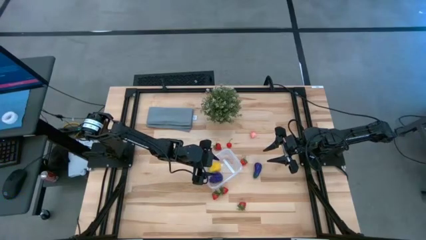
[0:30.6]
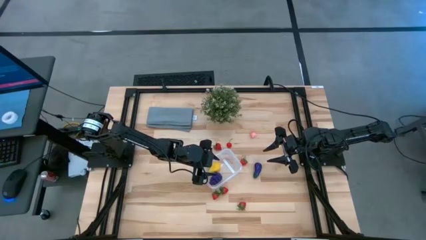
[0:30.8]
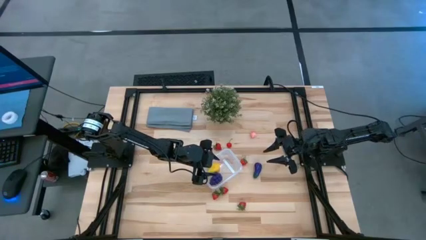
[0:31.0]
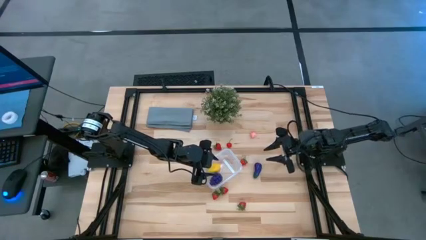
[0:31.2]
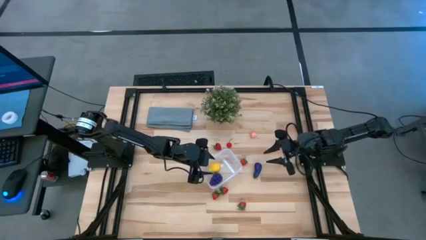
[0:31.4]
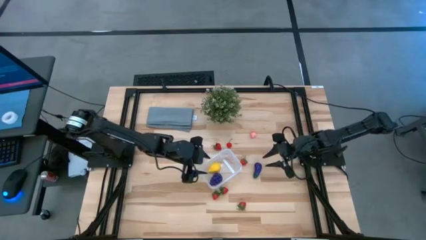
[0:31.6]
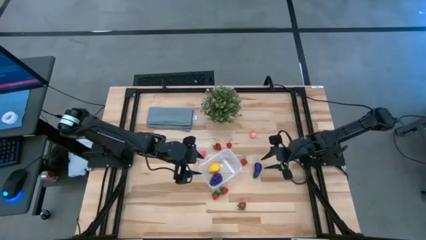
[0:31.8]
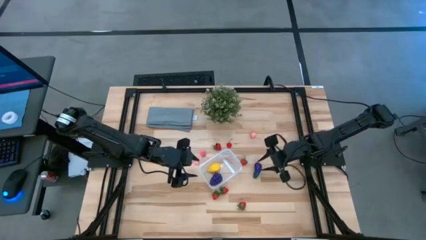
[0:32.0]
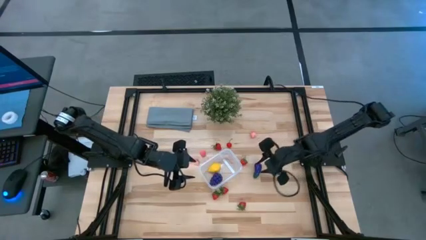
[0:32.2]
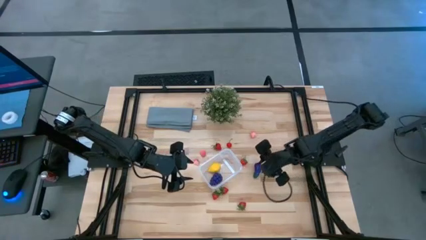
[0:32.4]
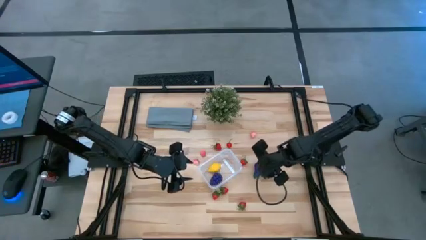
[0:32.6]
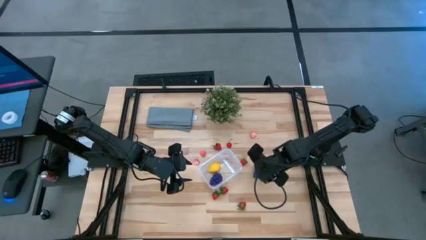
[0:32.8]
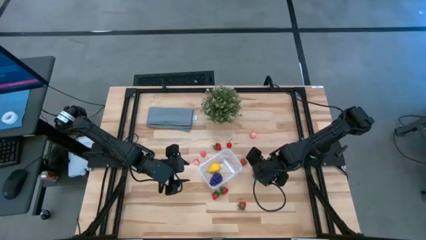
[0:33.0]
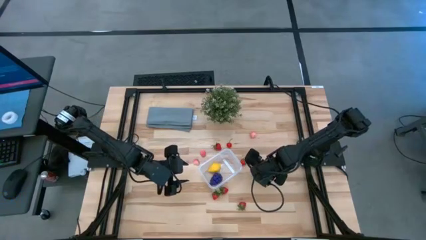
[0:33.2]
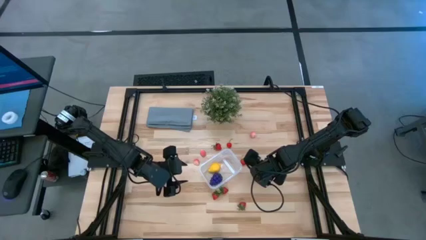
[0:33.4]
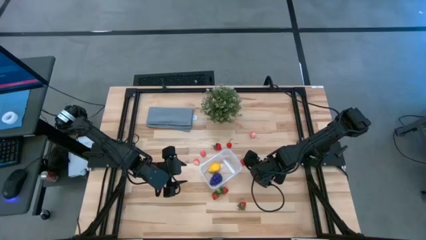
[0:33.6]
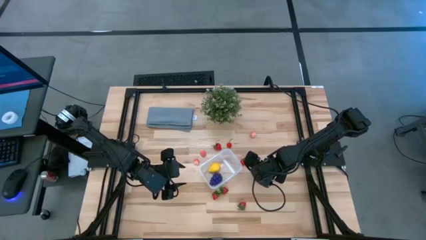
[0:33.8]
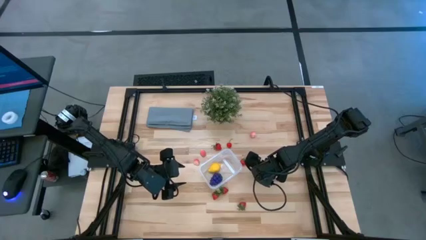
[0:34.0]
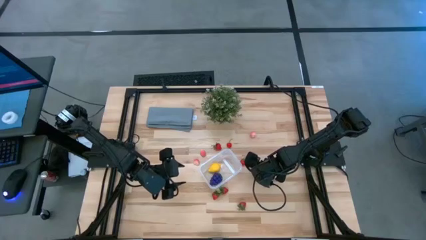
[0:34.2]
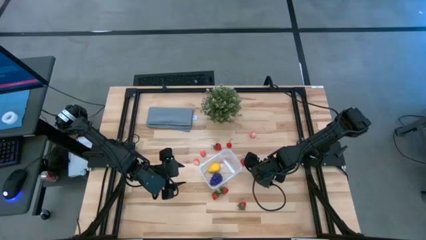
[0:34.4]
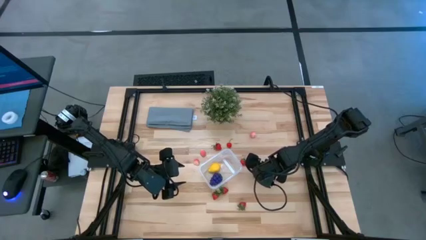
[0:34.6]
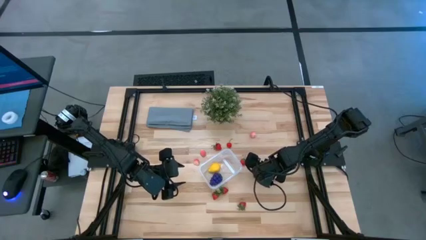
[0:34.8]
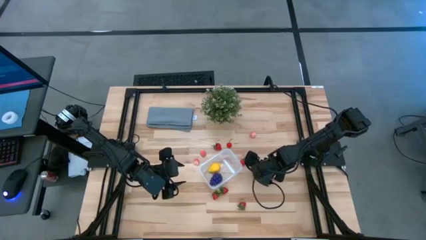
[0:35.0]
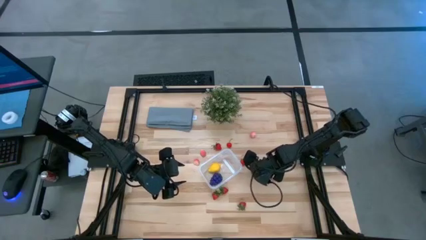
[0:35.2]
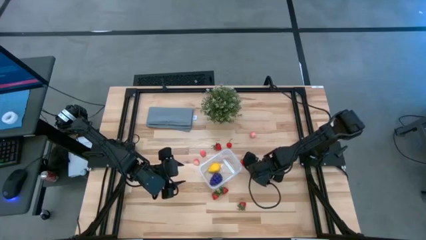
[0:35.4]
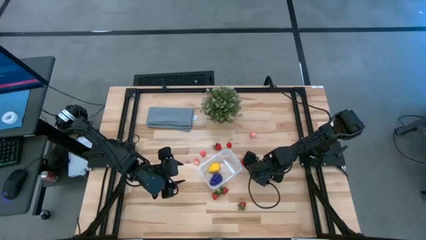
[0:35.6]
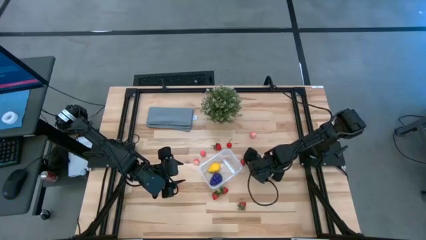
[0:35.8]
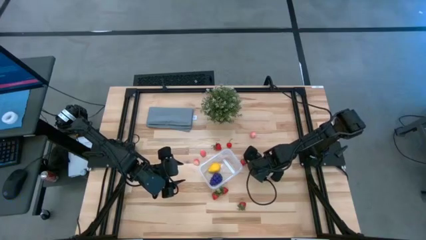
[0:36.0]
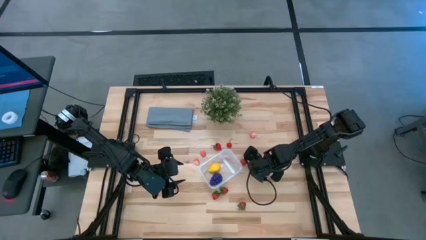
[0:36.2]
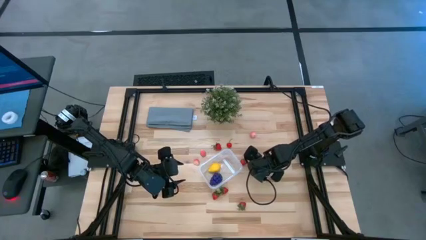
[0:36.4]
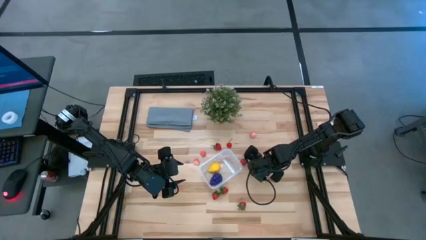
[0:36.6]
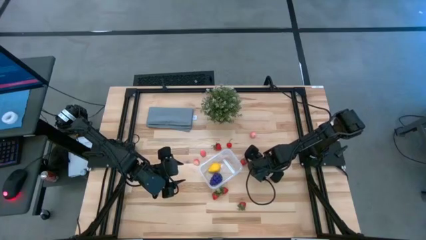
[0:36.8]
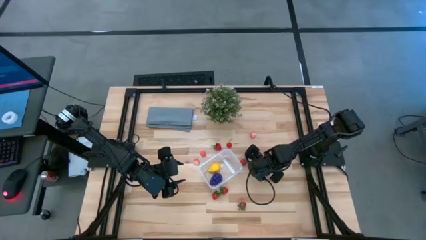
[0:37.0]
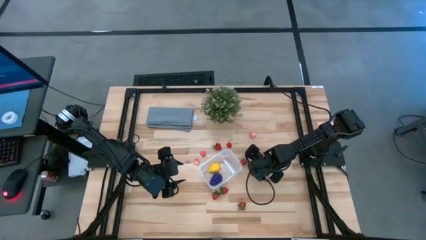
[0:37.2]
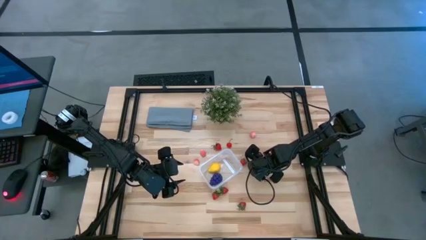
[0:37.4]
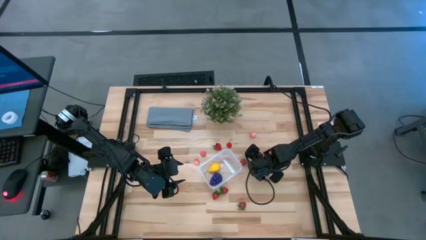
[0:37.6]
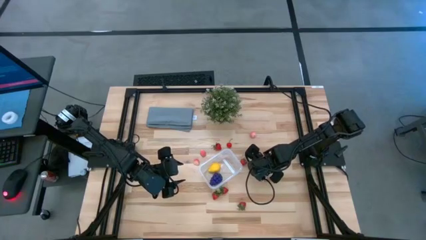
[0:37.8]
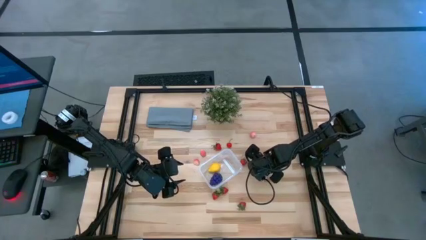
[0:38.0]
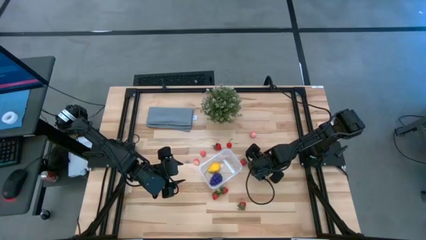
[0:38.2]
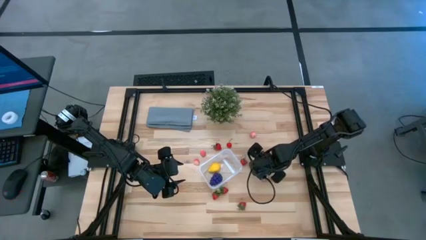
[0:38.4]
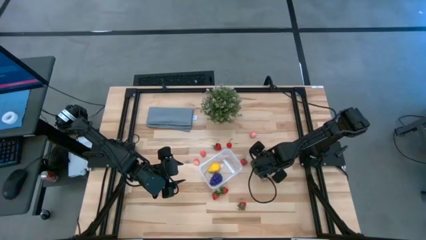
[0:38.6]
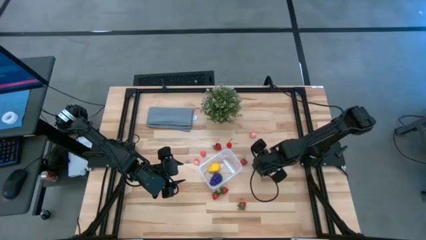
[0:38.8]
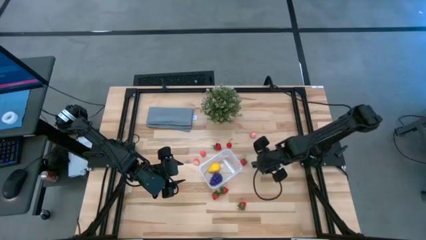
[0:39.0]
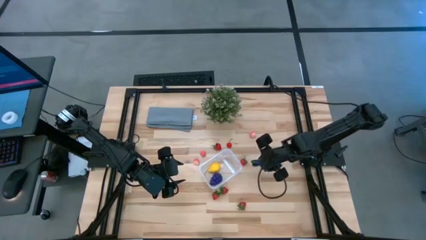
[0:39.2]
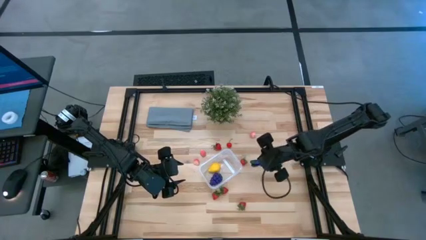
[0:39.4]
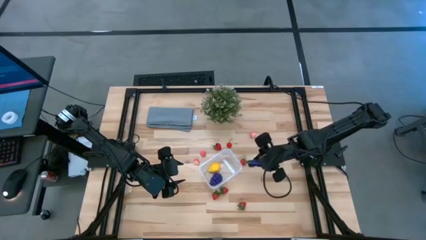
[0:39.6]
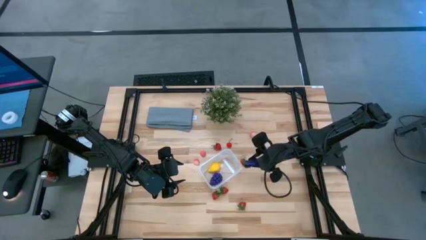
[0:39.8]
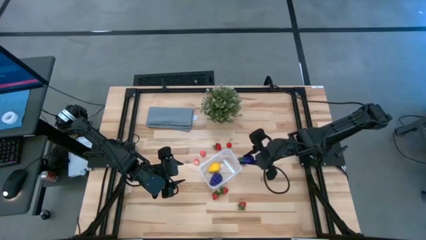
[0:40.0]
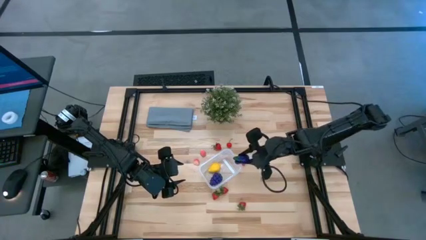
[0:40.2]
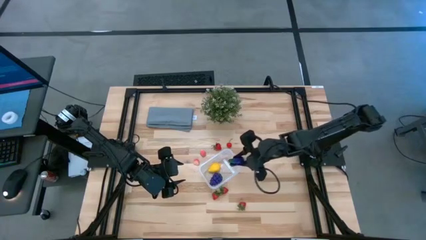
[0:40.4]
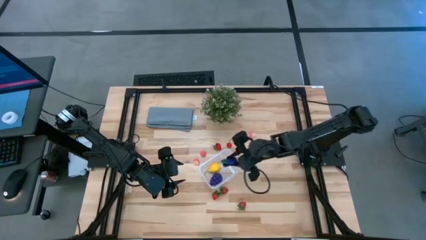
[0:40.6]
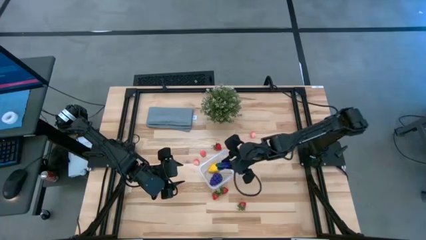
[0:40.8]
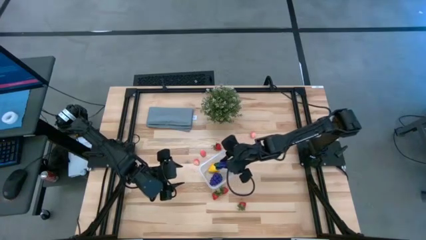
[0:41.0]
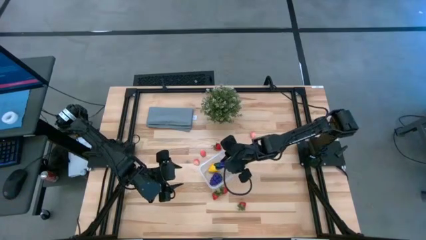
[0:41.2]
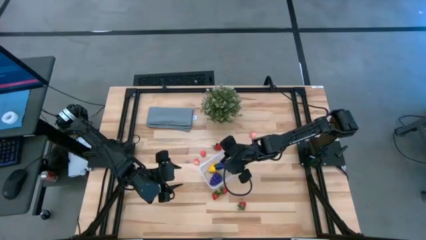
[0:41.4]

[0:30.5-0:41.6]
Task: Pick and placing Produce into tupperware
Put the eggplant into the transparent bin
